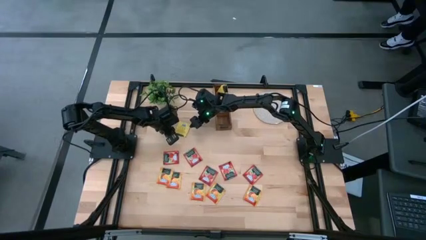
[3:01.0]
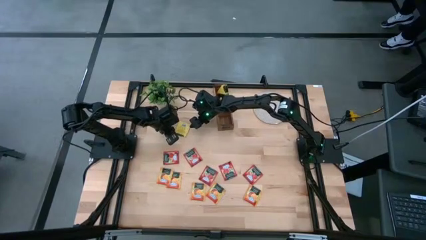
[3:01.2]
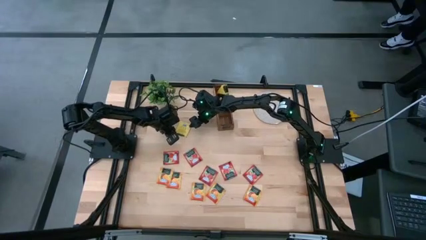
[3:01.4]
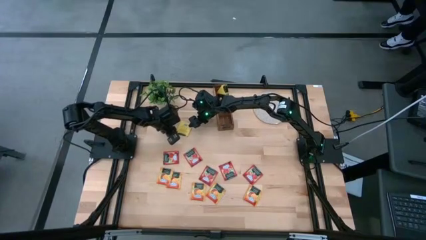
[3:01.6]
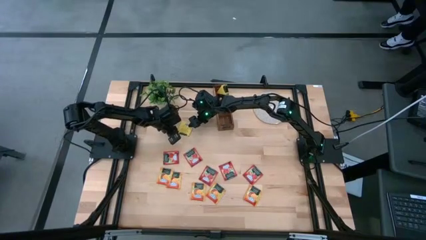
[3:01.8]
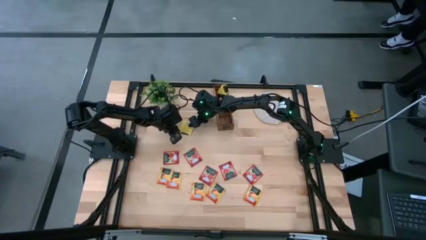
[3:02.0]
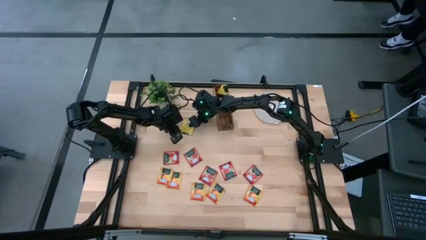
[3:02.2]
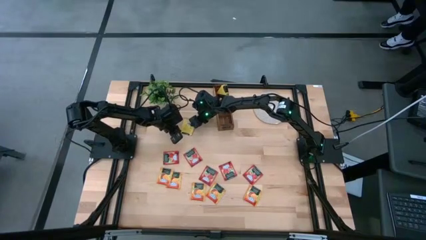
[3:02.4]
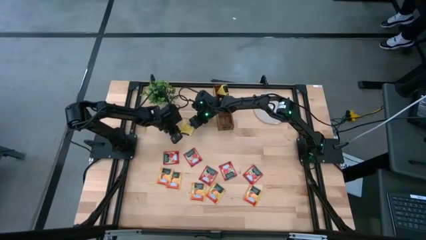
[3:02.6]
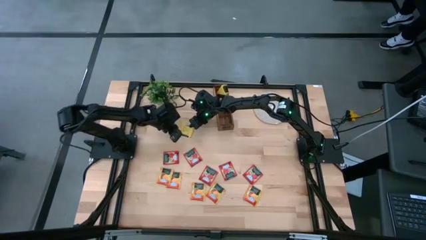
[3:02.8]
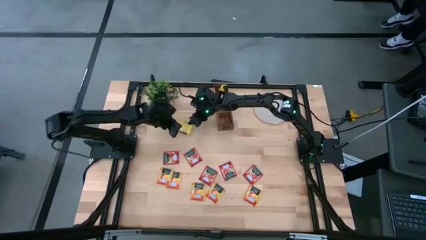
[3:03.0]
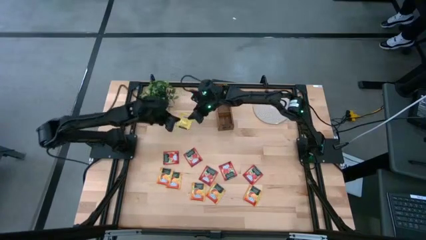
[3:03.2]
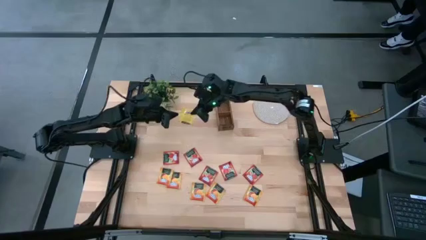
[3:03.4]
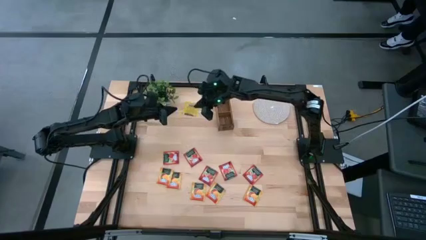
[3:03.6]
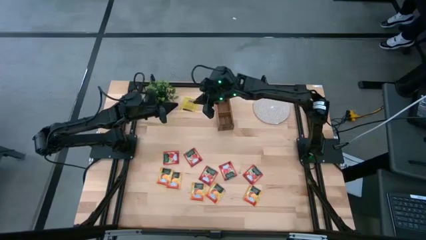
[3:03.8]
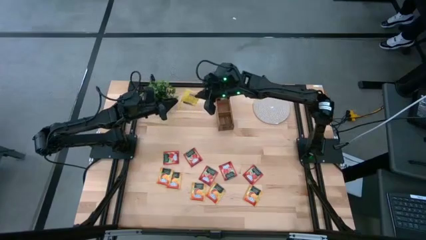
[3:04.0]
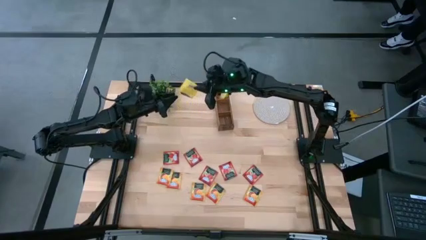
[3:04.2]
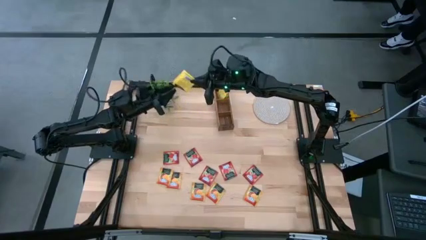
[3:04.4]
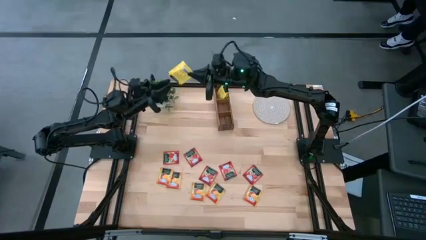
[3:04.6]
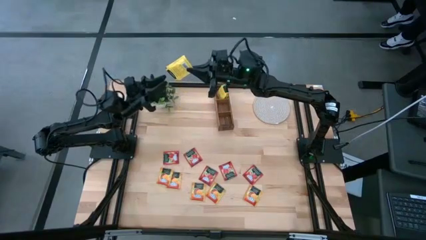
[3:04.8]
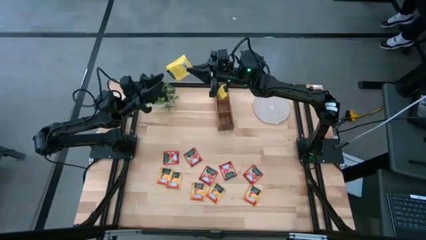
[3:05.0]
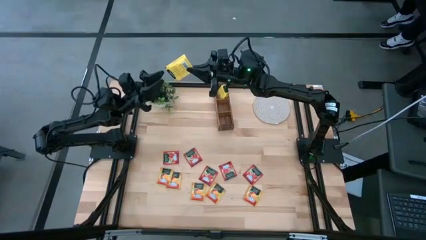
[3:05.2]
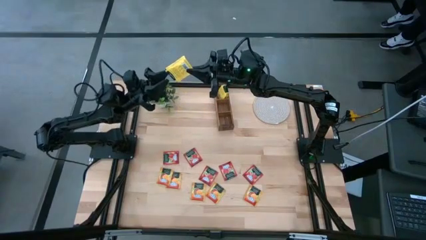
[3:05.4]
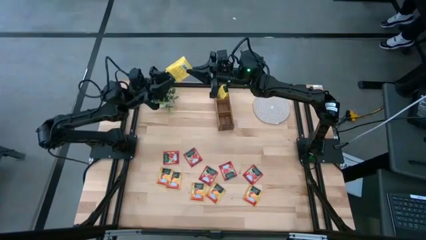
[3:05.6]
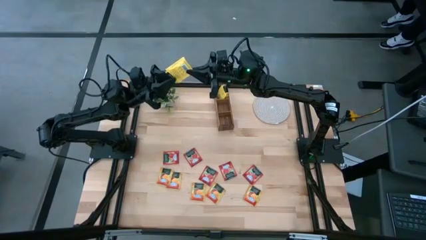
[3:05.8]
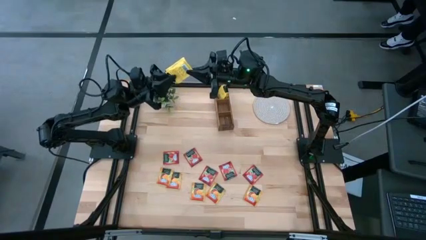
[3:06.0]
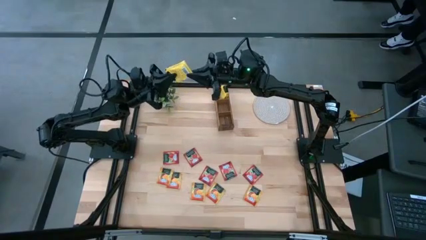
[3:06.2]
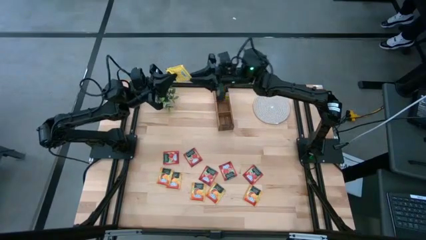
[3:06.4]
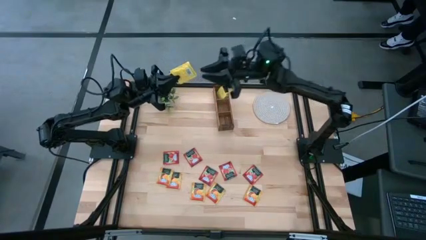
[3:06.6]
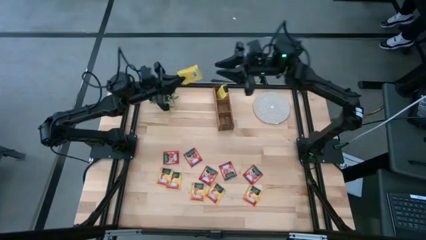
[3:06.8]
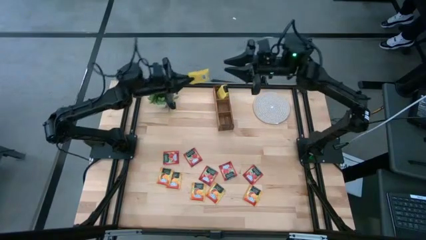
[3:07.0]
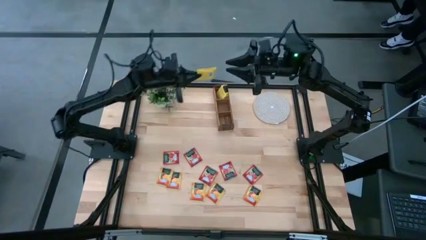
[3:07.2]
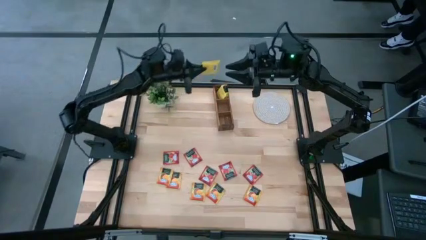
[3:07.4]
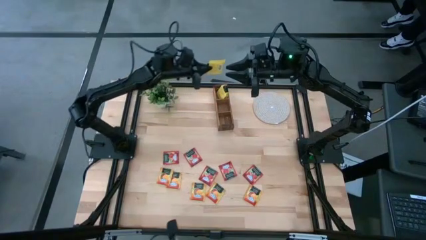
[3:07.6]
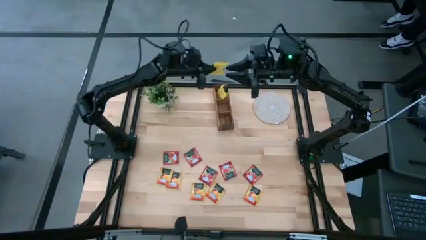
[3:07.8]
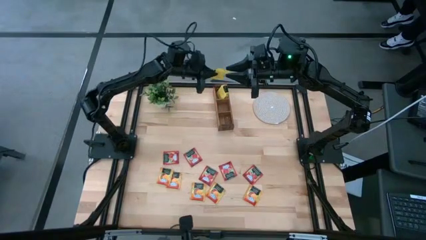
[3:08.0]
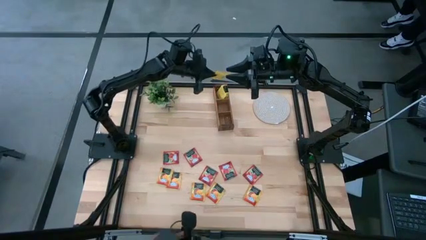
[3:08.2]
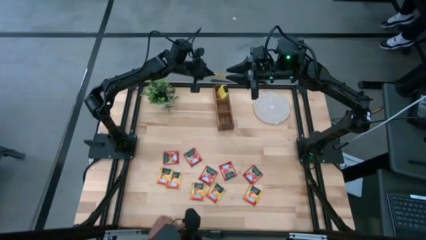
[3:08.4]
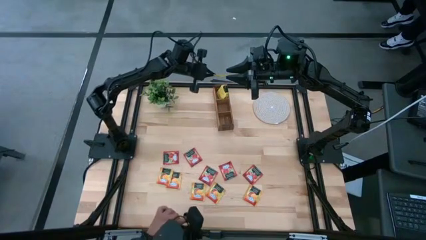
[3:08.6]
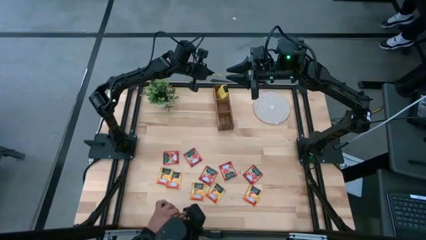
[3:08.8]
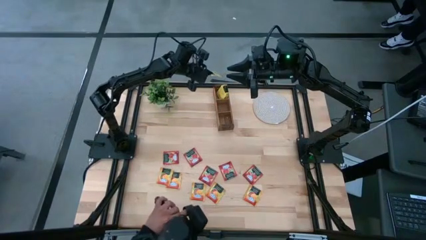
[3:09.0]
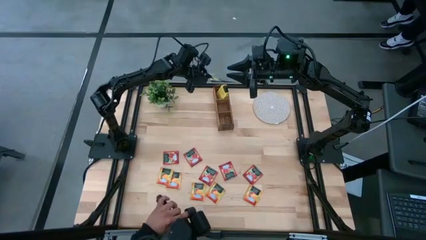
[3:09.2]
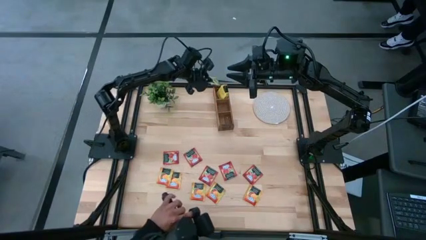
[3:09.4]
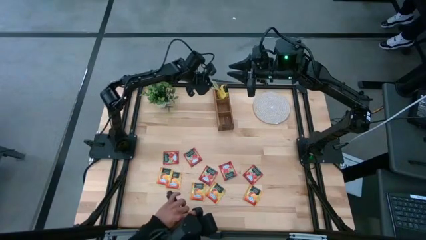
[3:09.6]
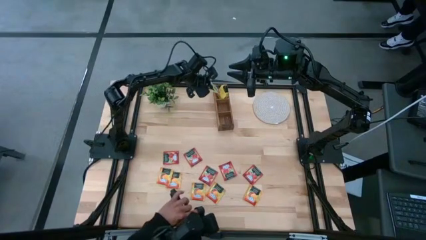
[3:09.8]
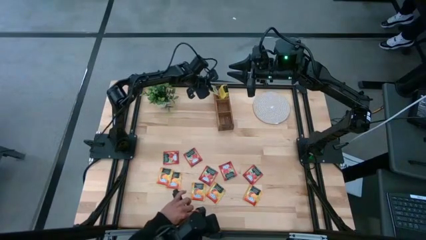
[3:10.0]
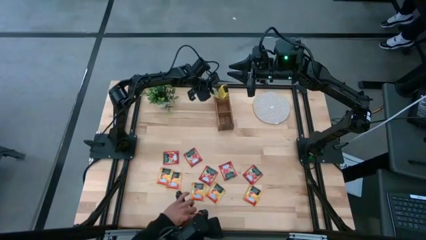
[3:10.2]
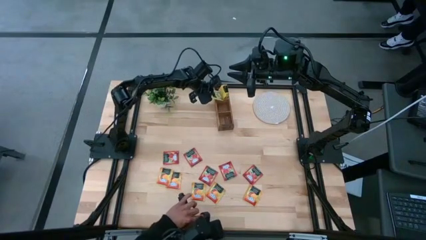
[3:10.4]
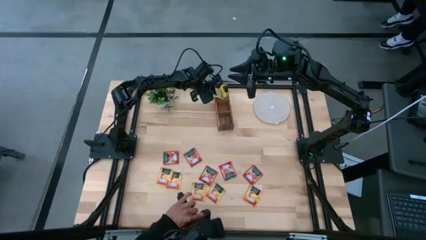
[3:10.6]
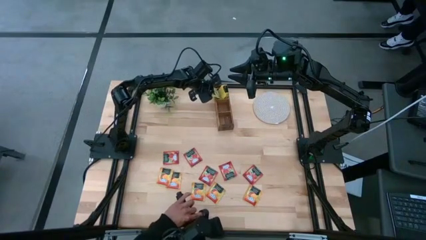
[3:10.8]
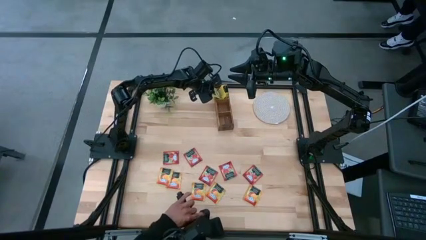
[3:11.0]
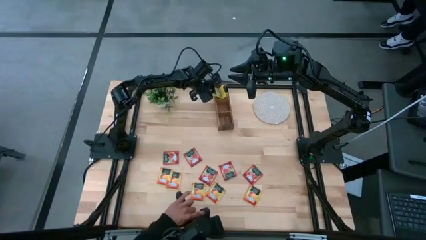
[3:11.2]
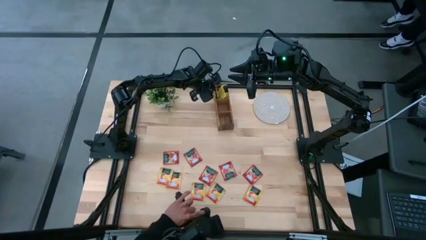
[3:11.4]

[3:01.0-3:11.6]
Task: Pick & Place Tea
Put the yellow tea bag into the left section of the wooden organizer

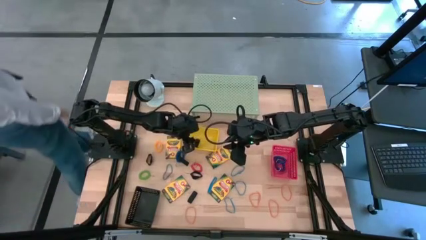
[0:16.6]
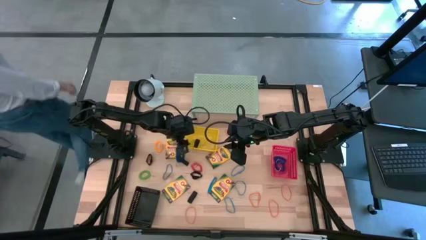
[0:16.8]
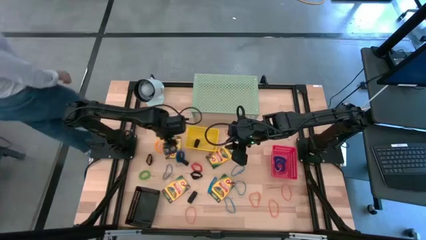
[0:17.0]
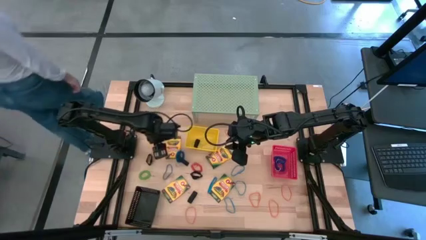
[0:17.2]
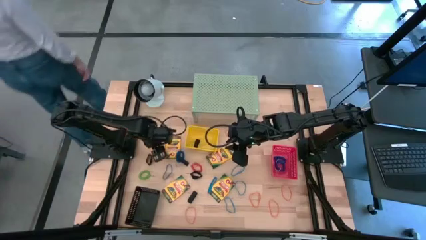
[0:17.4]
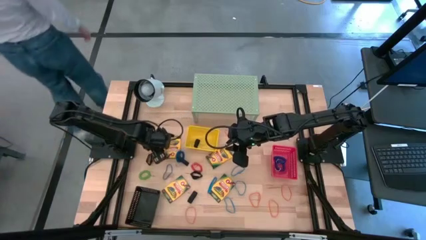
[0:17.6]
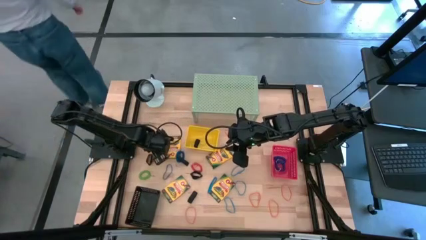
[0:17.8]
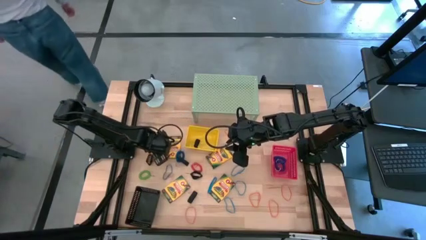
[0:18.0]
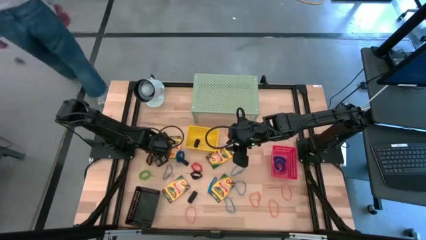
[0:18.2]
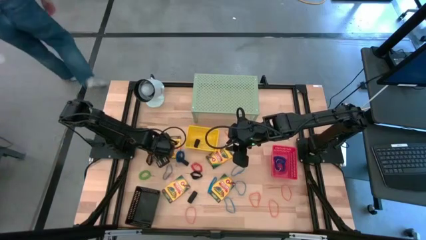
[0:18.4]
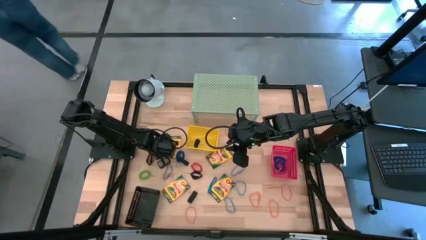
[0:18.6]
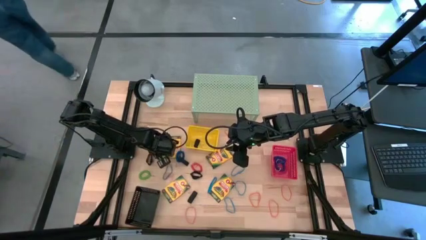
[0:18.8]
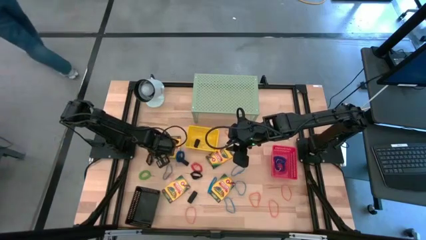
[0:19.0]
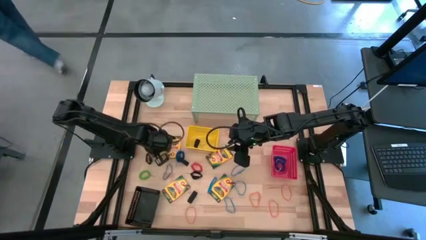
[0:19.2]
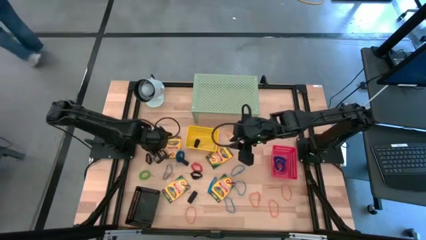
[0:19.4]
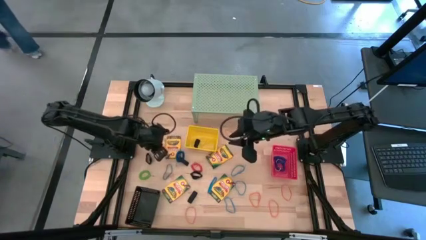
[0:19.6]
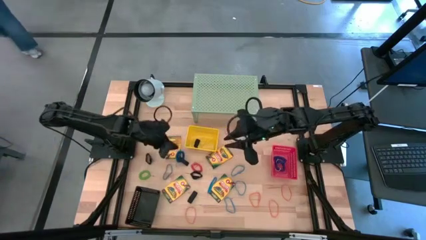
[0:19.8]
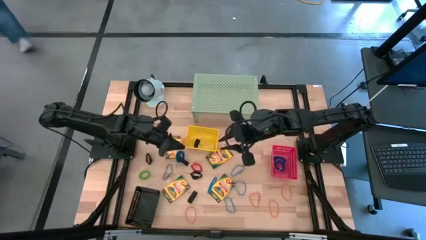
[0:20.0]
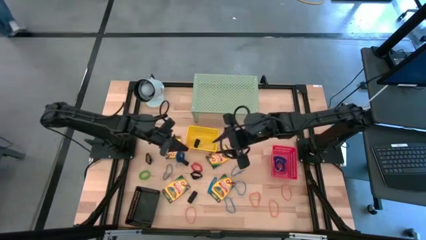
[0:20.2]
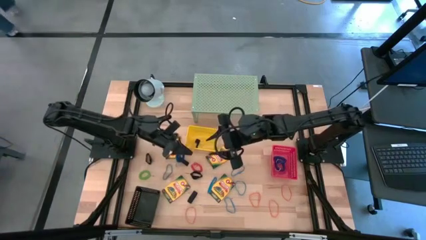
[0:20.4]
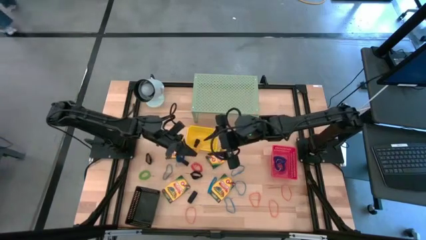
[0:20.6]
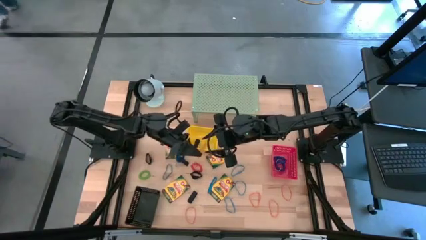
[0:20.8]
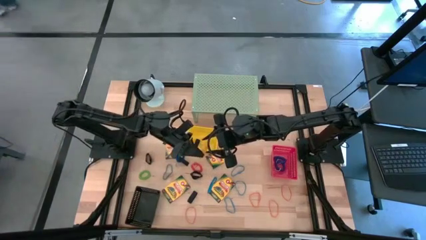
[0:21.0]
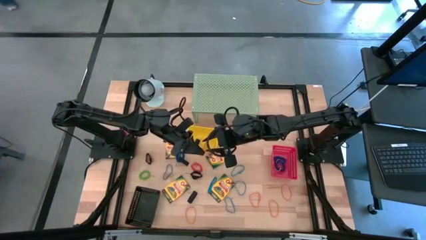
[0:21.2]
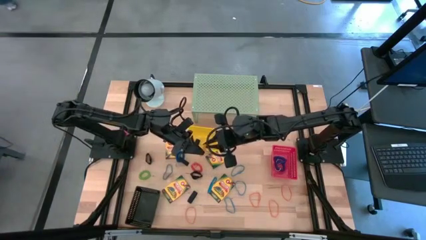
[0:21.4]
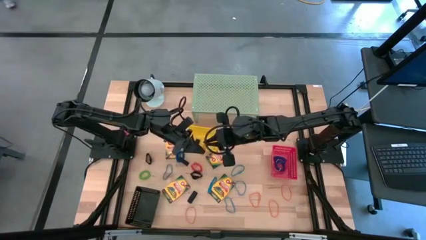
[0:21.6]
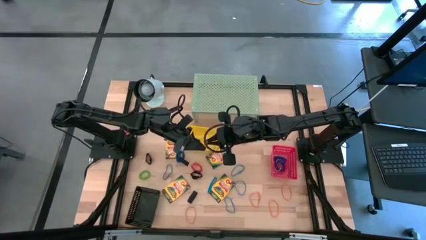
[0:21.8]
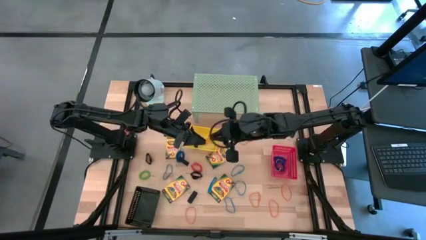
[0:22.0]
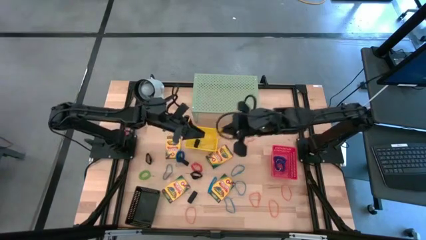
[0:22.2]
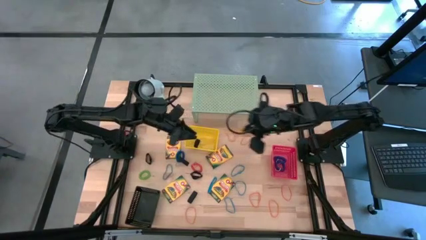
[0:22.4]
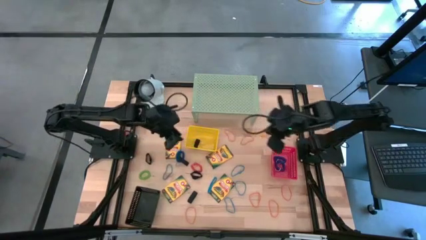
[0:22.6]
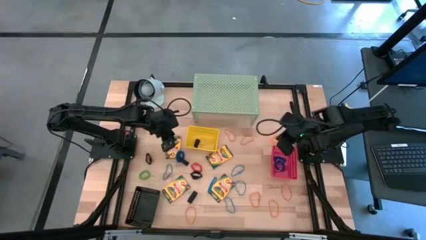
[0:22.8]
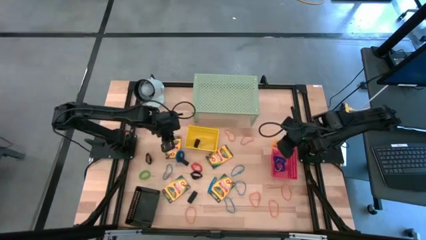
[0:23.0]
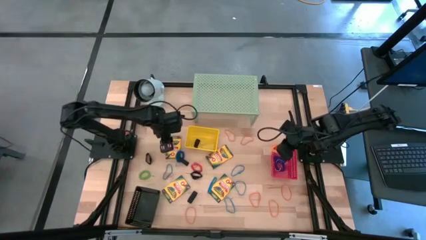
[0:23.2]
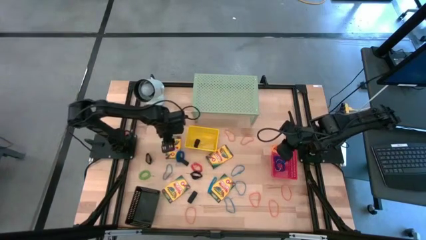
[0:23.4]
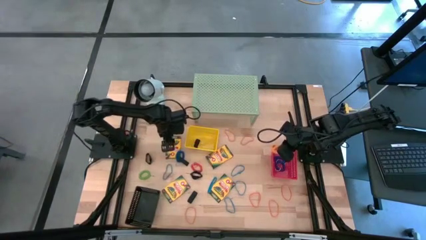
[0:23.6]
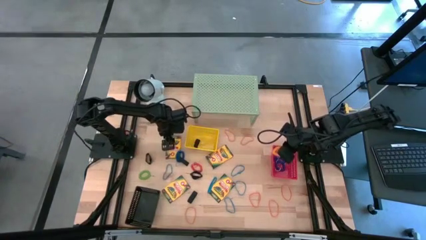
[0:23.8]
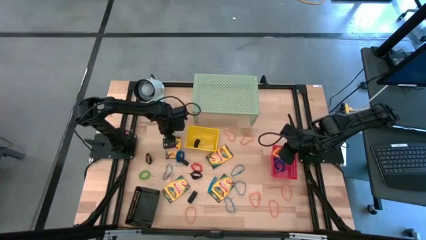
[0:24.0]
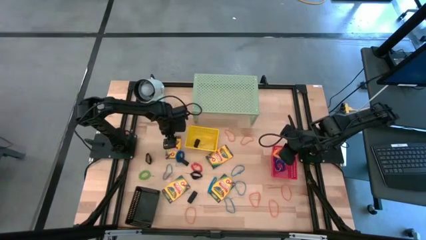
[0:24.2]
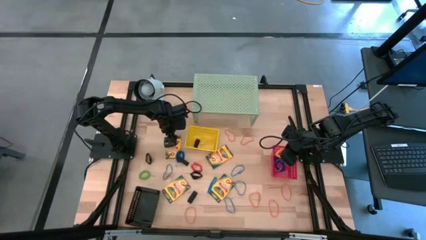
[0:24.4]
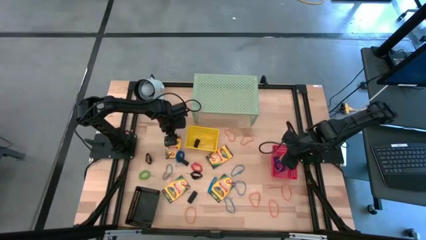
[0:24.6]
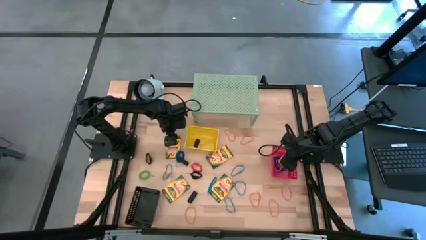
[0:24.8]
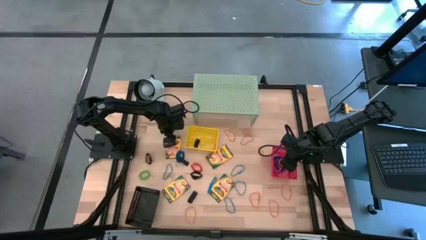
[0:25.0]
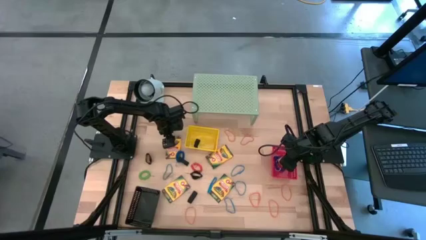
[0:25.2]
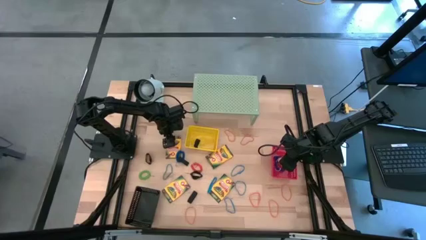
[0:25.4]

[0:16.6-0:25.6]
Task: Pick & Place Office Desk Supplies
Put the yellow spring keychain into the red bin
